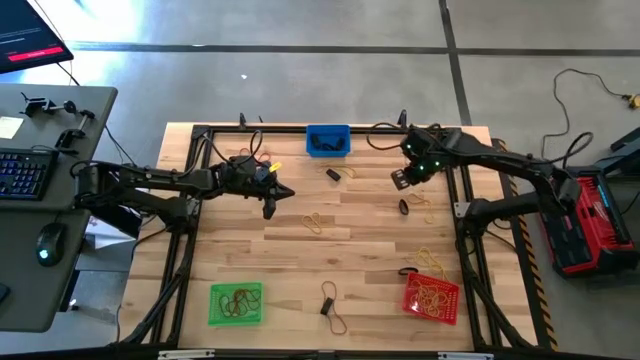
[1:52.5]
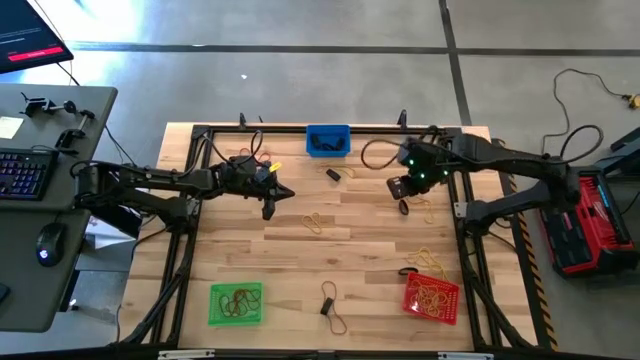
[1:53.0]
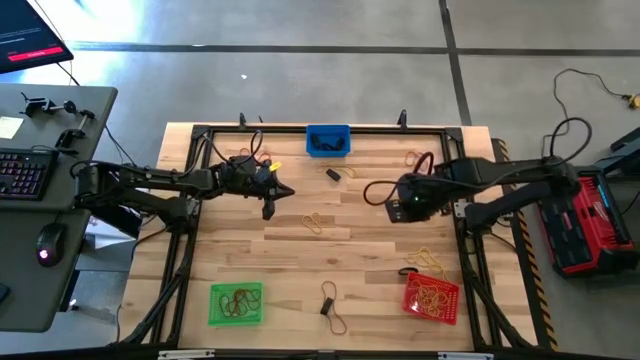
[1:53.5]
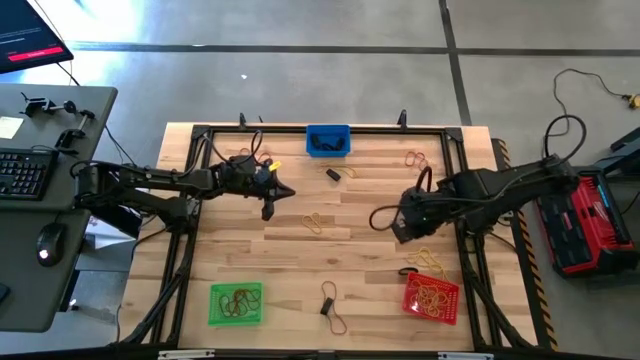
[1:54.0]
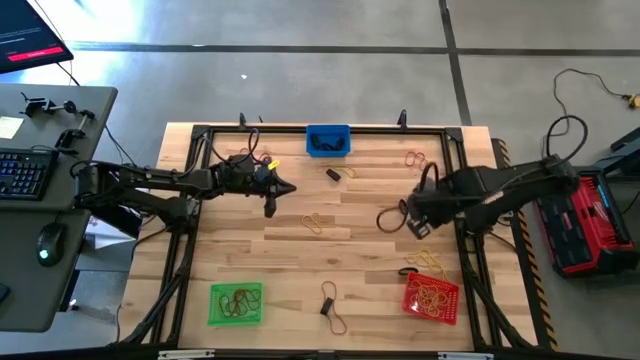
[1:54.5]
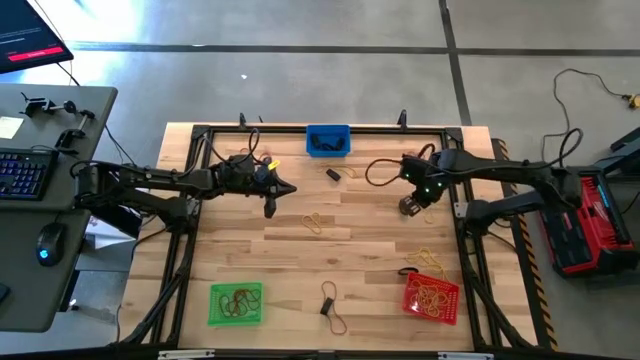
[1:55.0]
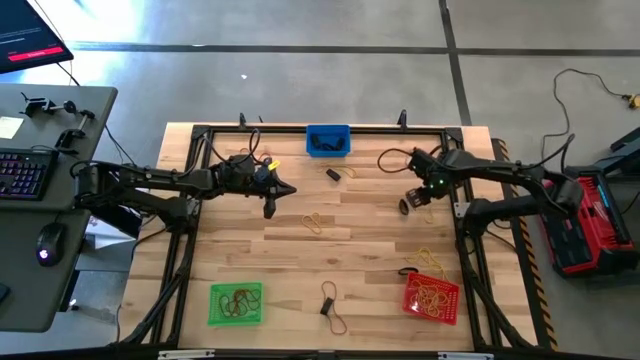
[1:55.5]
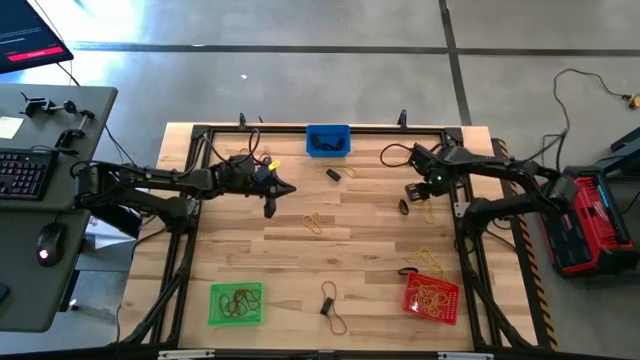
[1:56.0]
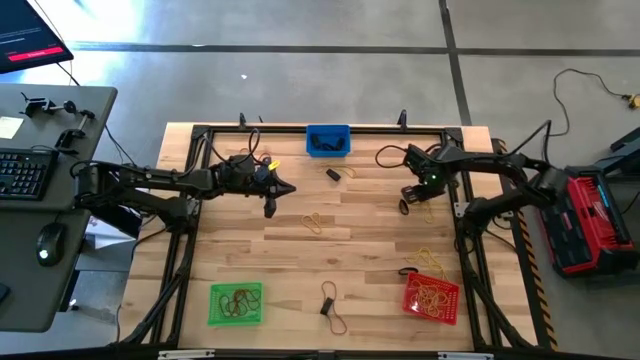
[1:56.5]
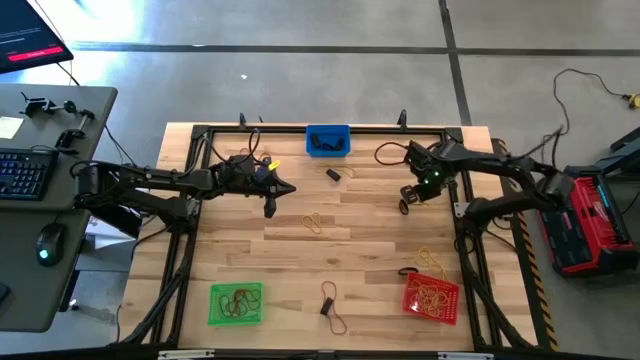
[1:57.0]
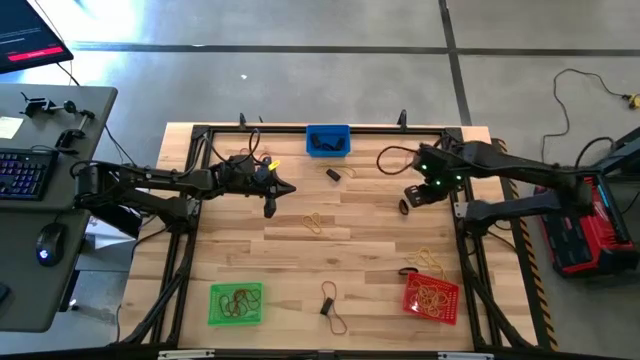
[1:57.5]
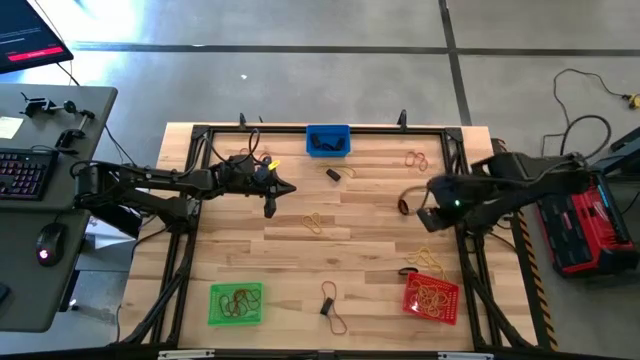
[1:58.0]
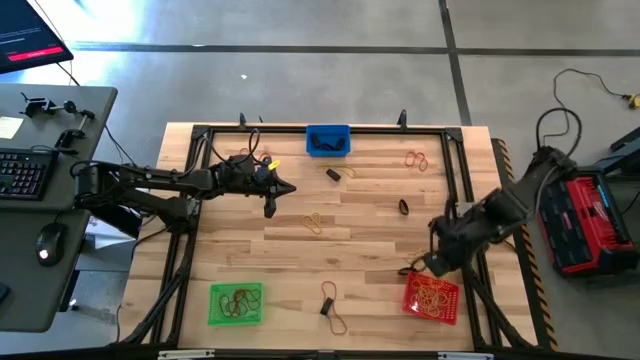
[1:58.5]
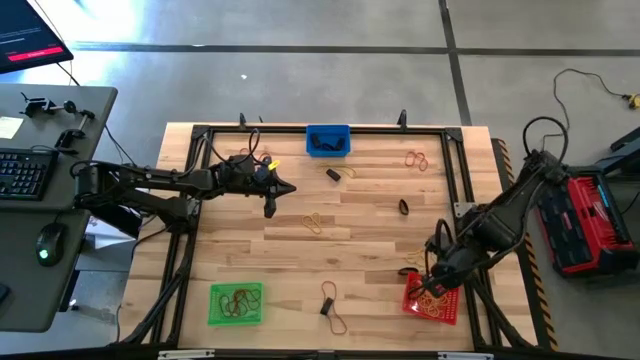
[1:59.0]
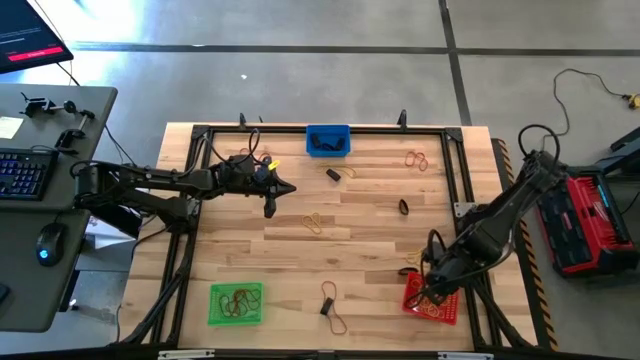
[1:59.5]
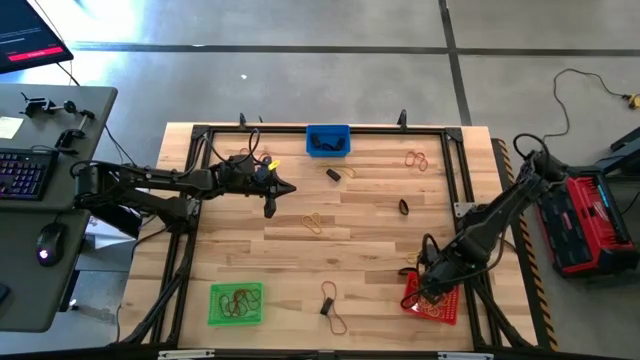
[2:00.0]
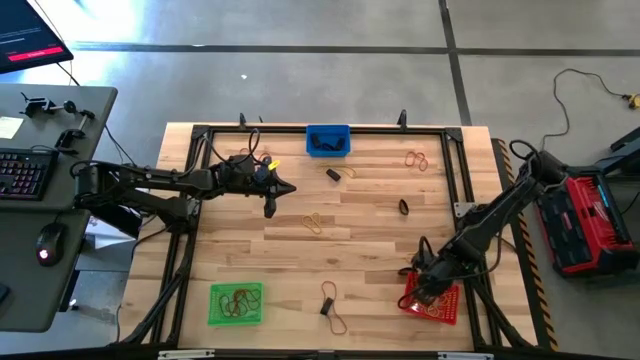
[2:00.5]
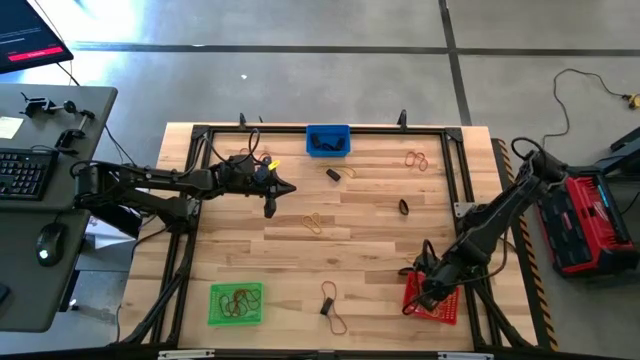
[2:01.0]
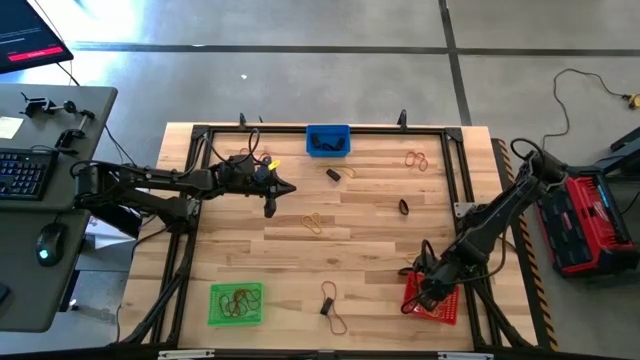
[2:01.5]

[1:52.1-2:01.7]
Task: Sort rubber bands into baskets
Put the yellow rubber band into the red basket

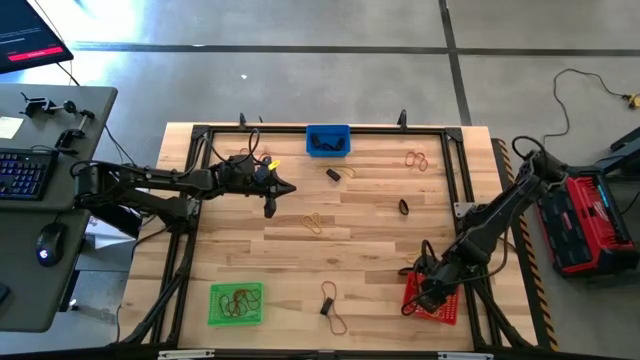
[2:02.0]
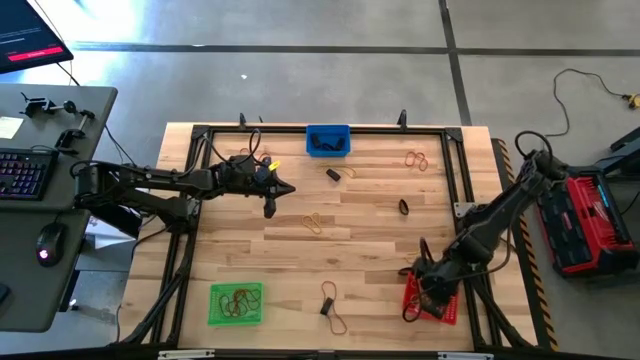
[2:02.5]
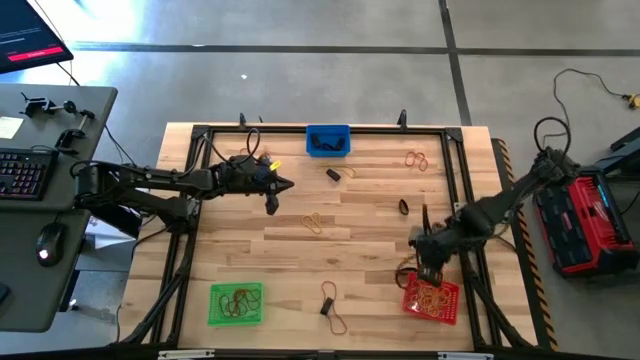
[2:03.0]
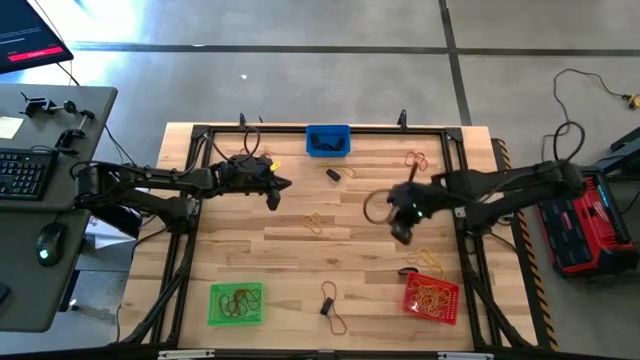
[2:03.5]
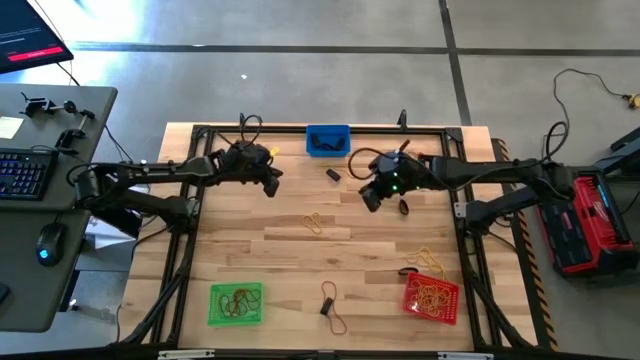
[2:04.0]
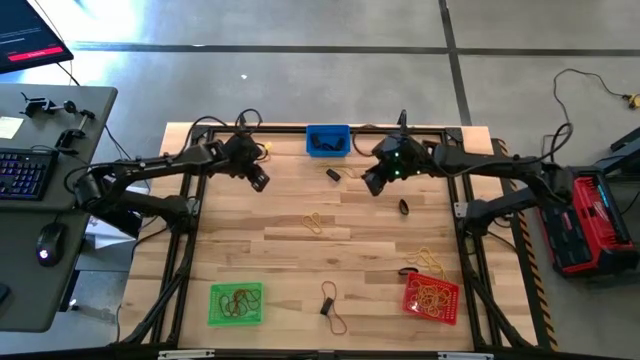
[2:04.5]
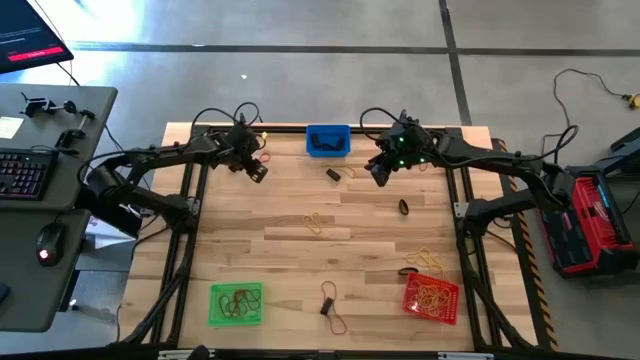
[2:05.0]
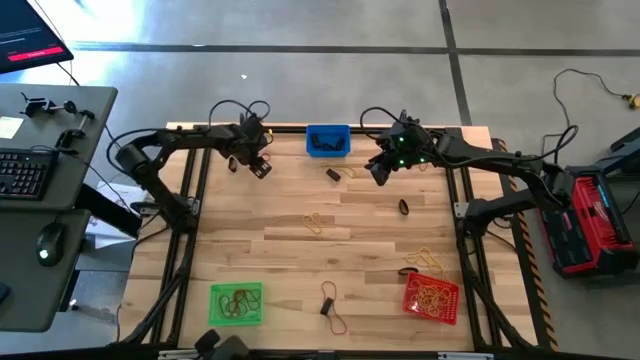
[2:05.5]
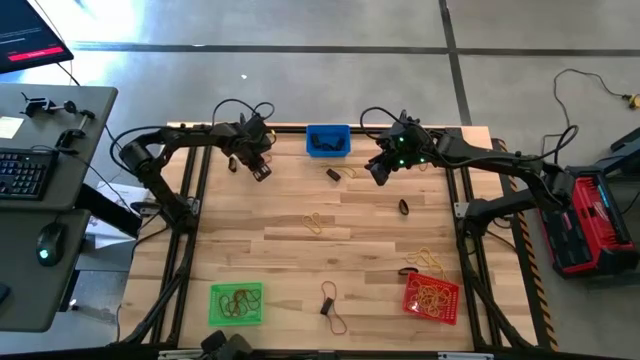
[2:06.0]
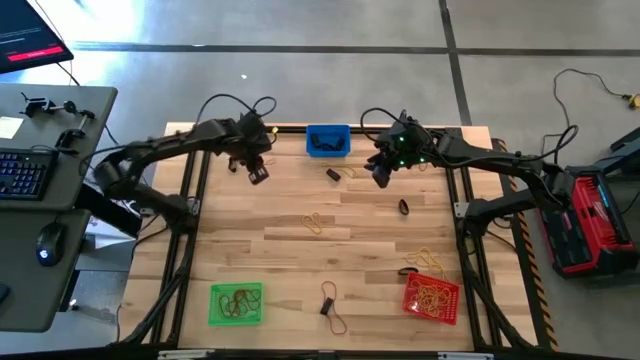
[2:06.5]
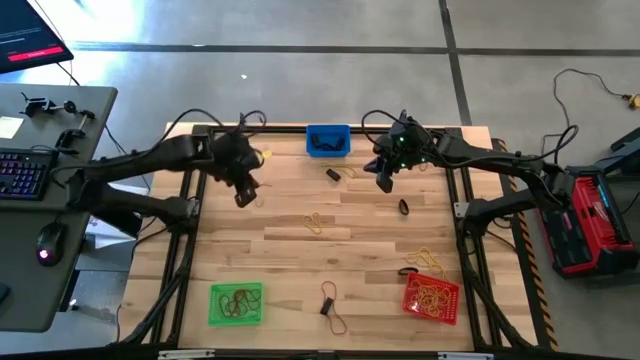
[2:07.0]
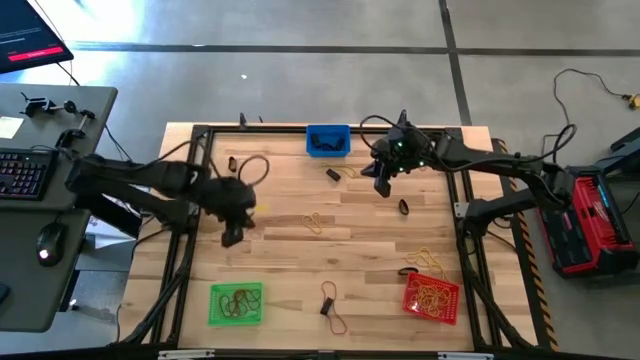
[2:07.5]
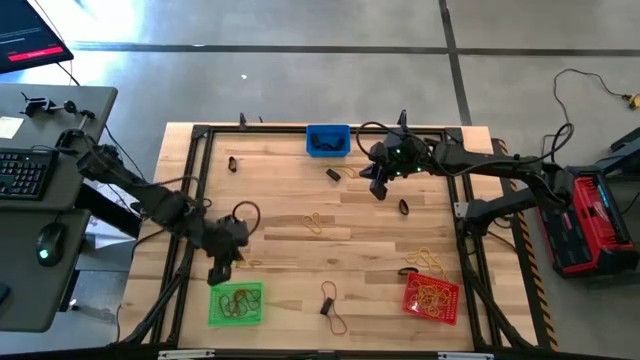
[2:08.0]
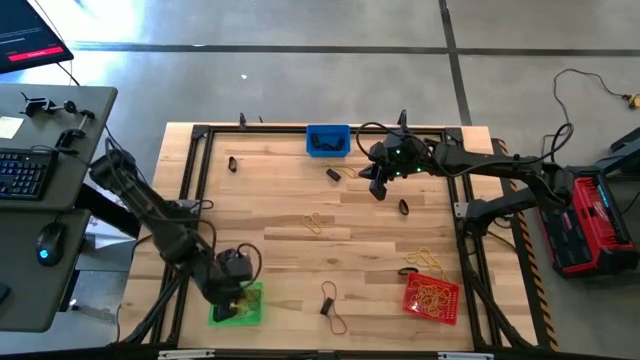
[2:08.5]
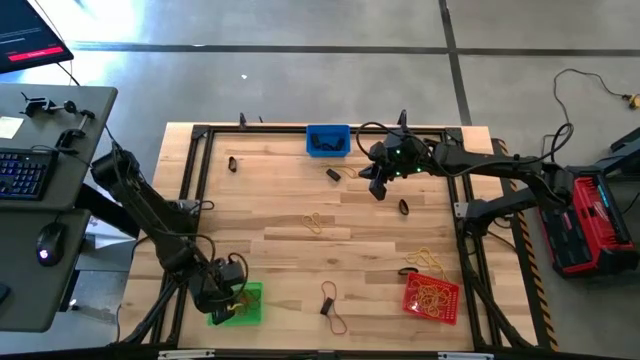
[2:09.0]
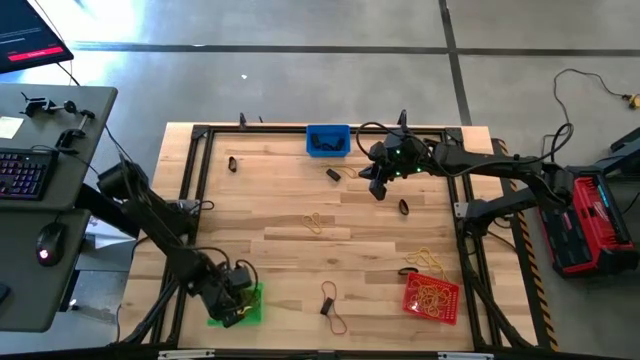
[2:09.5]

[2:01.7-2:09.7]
Put the red rubber band into the green basket

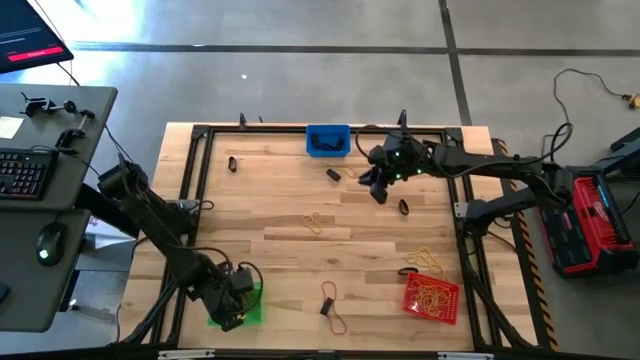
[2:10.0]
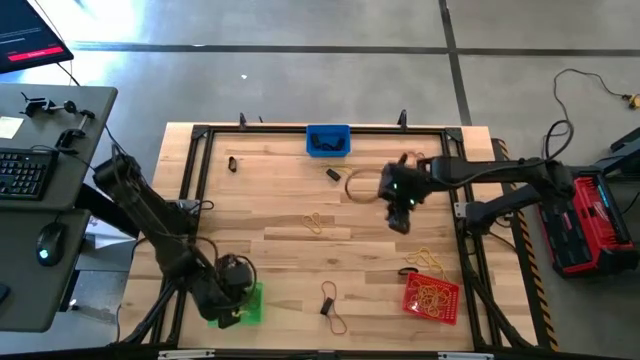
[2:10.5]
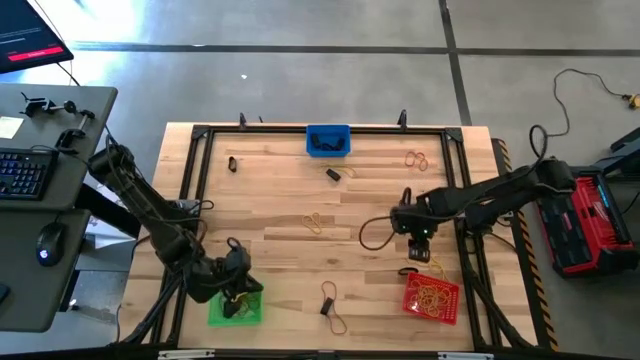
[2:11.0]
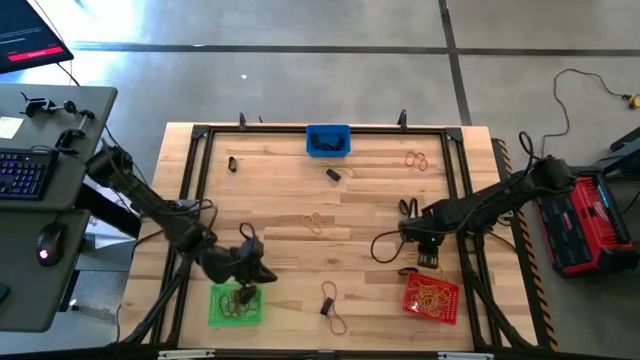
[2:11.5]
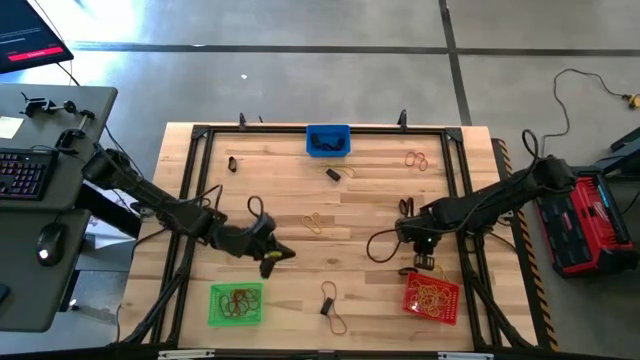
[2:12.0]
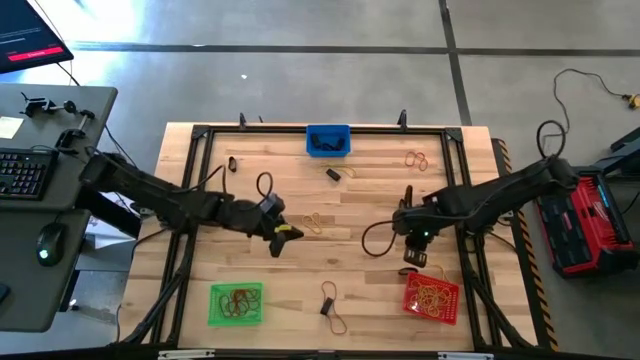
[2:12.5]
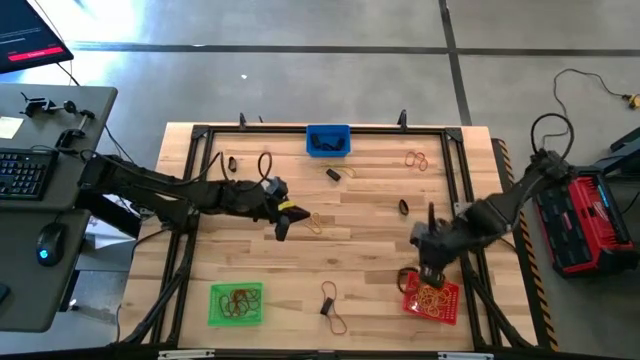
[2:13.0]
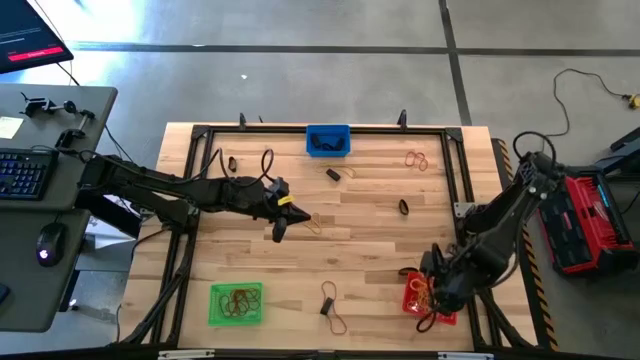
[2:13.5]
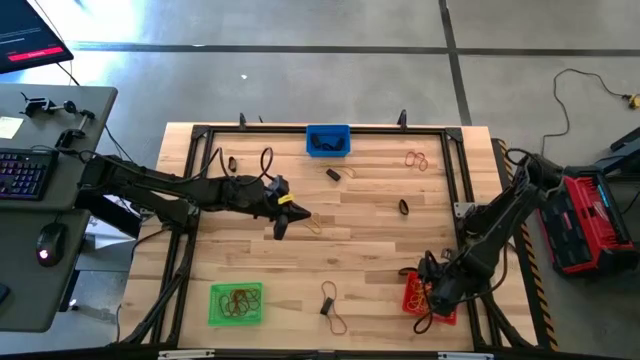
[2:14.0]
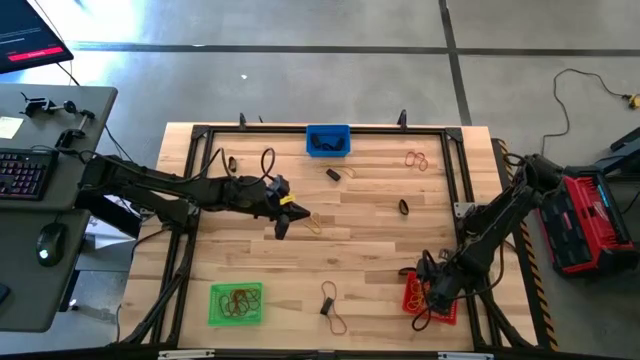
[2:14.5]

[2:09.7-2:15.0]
Put the yellow rubber band into the red basket
